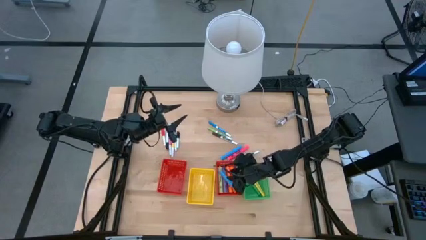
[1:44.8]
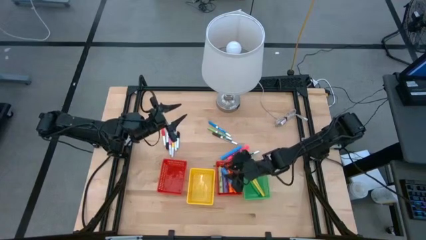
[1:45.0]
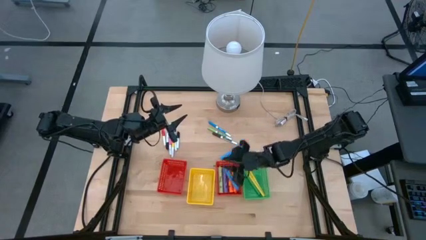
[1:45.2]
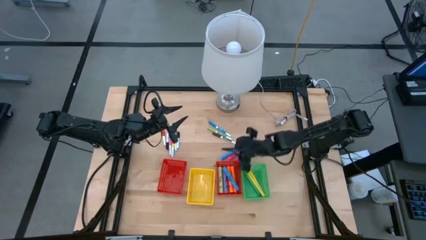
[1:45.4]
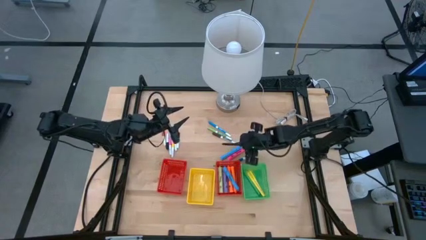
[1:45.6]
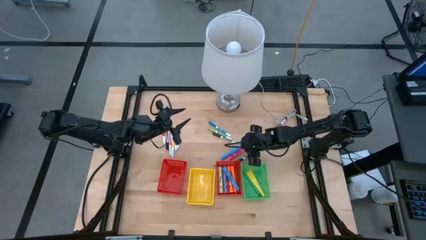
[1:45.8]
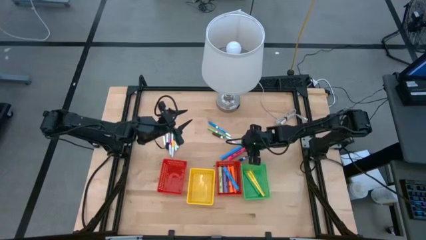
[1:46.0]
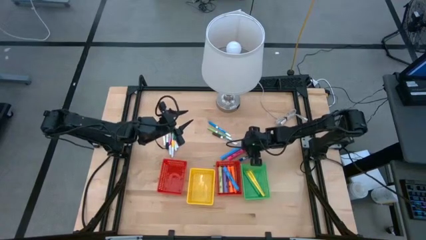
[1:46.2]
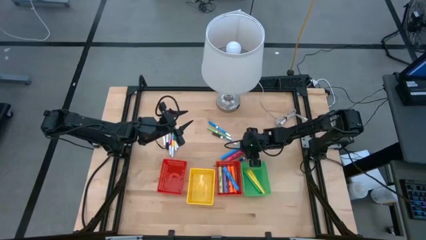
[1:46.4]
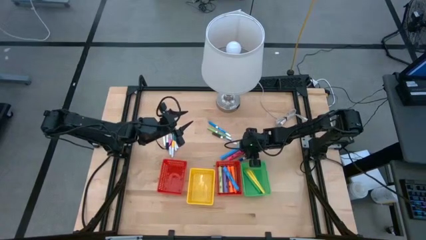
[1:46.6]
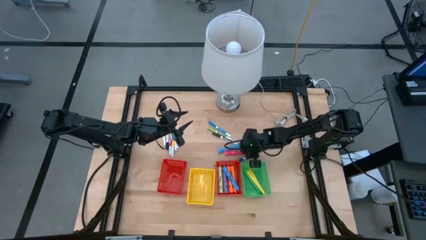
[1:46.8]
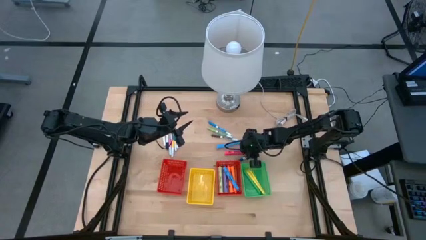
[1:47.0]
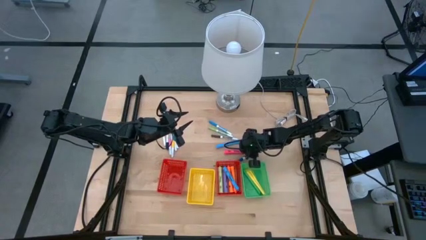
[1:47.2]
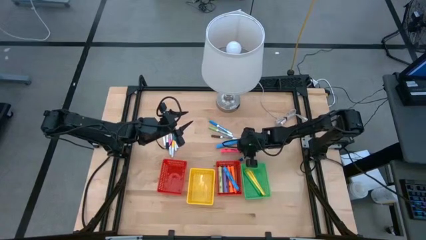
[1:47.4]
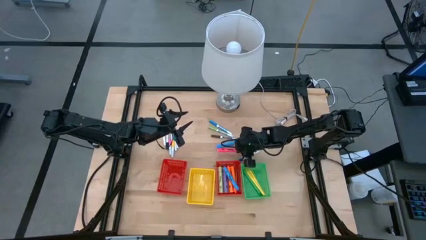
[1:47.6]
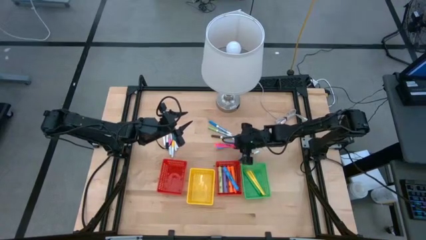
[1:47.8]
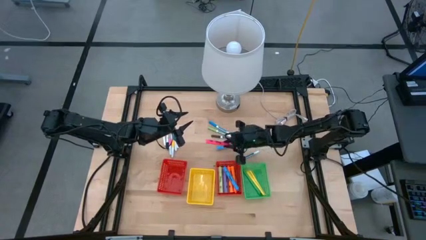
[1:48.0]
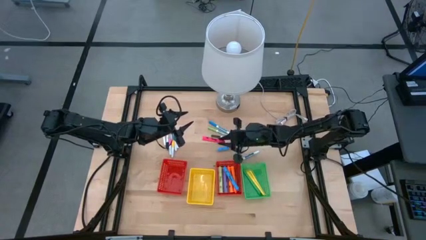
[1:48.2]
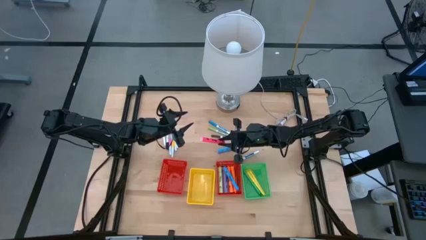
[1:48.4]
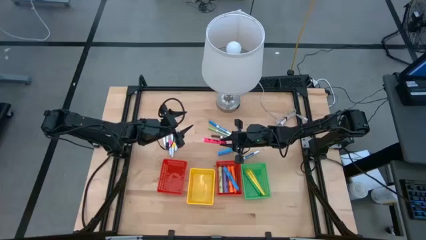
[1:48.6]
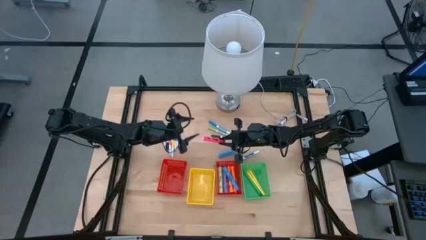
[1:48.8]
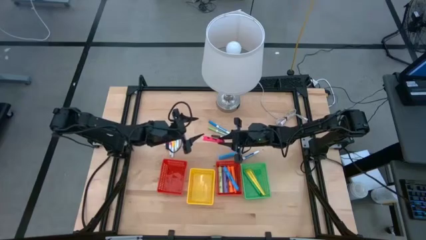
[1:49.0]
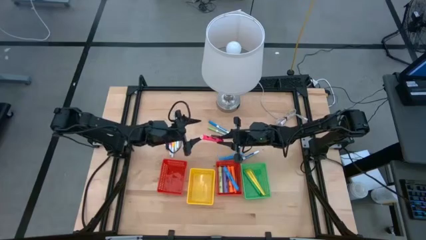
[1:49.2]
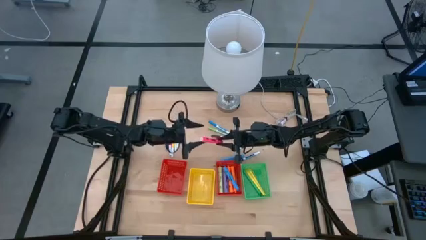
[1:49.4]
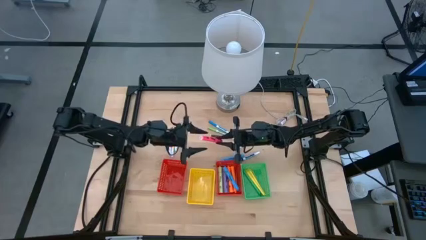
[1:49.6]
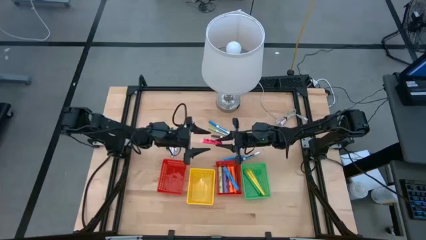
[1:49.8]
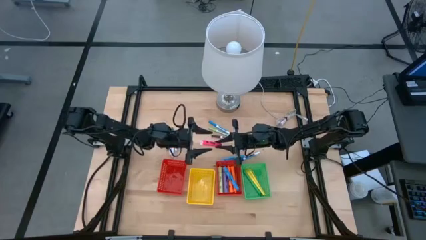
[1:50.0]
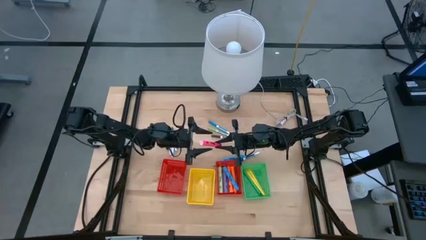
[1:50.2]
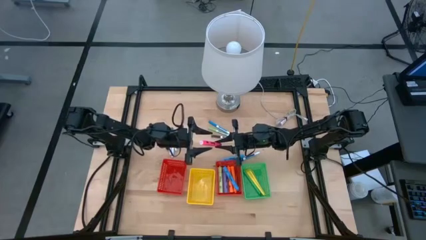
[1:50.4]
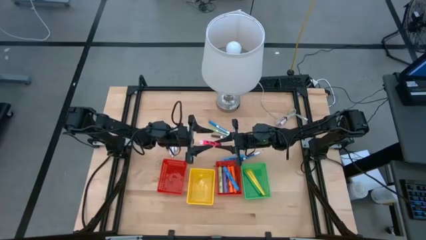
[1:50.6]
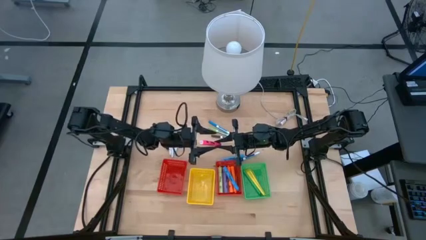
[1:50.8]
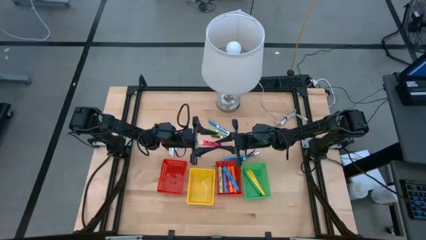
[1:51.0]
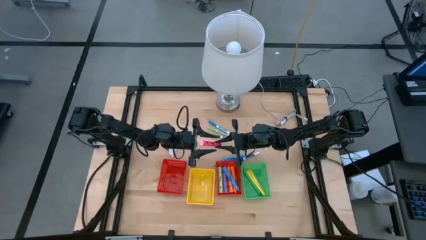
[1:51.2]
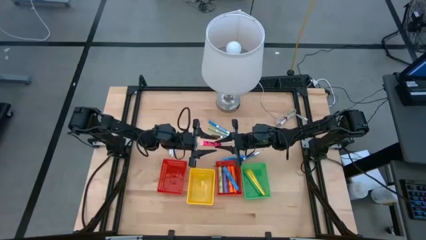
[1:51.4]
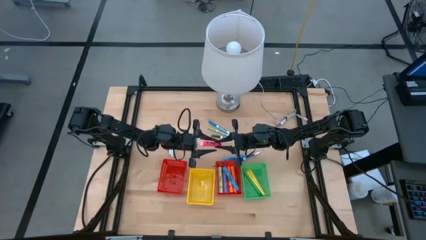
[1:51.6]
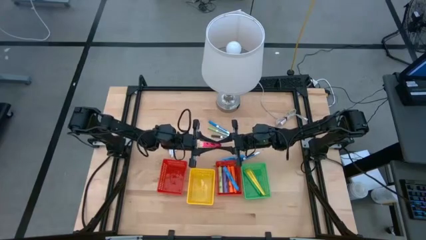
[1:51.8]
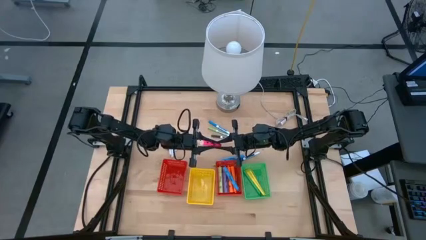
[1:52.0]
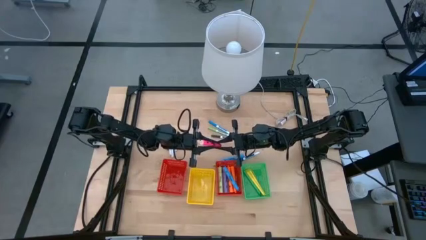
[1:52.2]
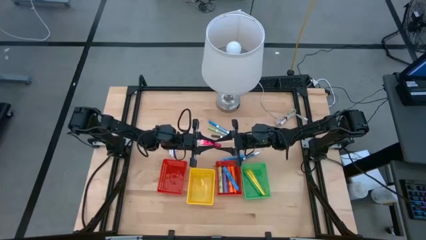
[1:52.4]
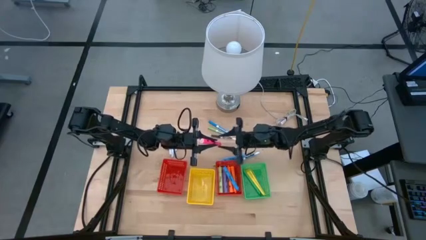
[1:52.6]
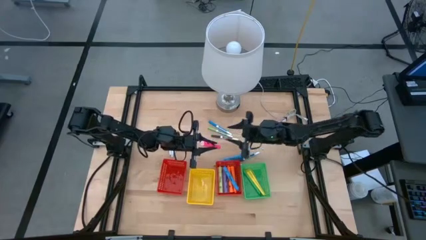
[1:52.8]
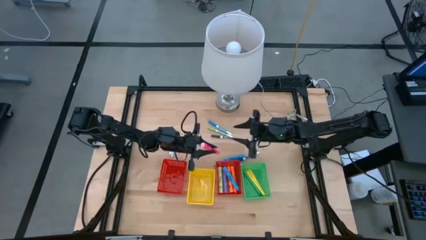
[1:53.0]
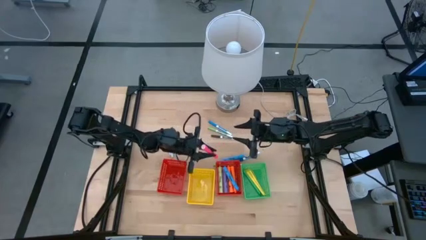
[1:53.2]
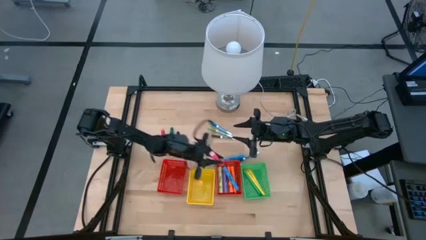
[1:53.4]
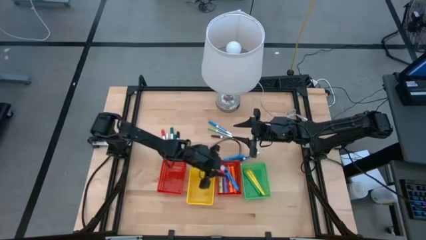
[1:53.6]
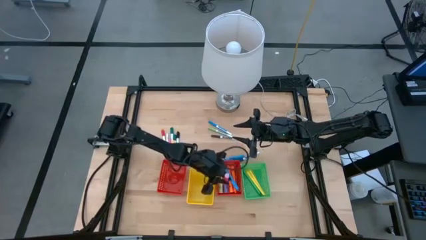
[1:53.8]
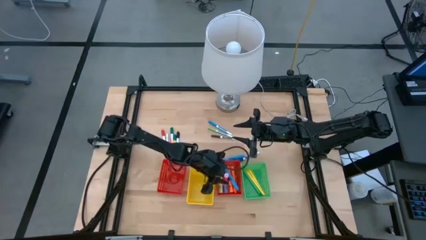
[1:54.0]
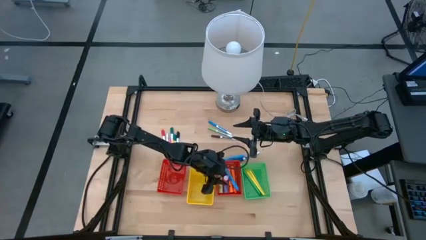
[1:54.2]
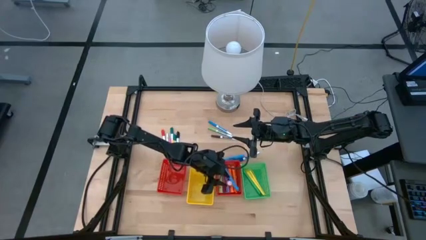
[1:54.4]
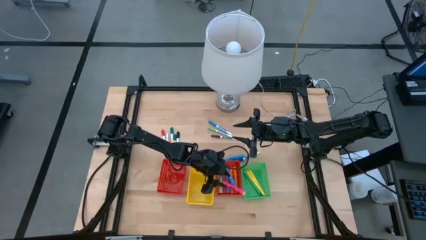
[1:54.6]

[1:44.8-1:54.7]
Task: Pick & Place Markers
Put the large pink highlighter into the right red bin
